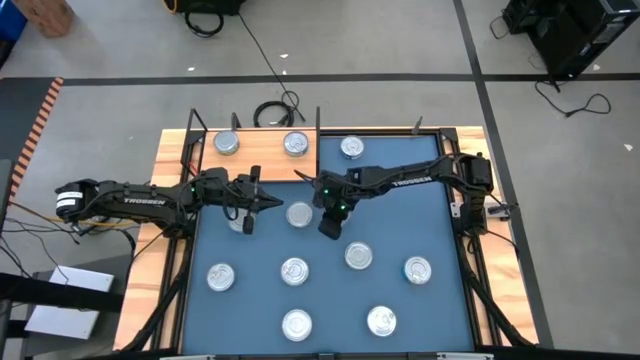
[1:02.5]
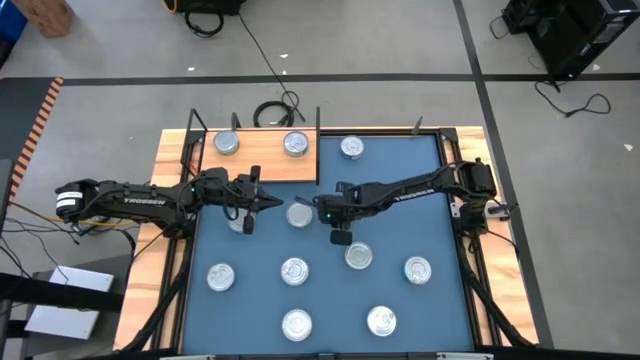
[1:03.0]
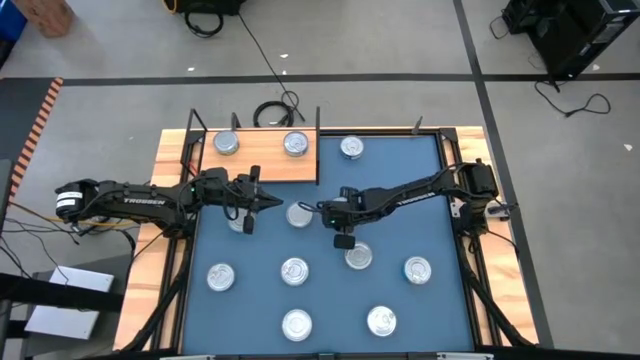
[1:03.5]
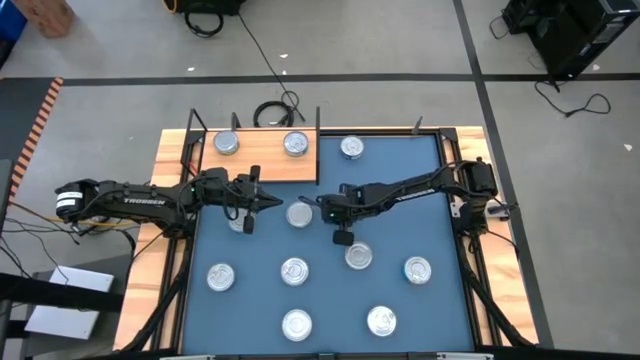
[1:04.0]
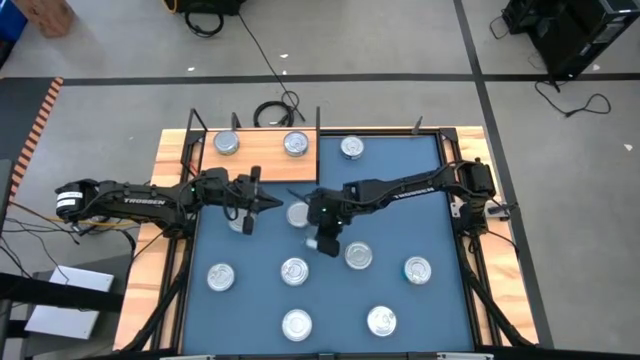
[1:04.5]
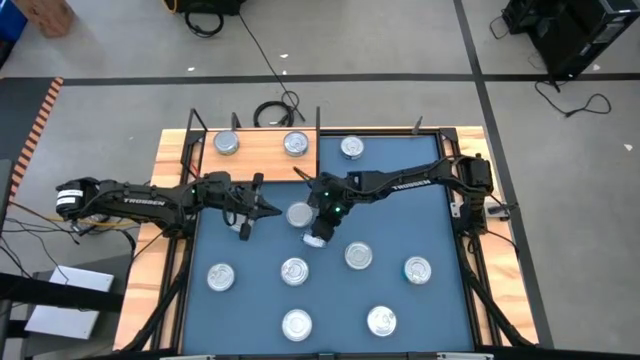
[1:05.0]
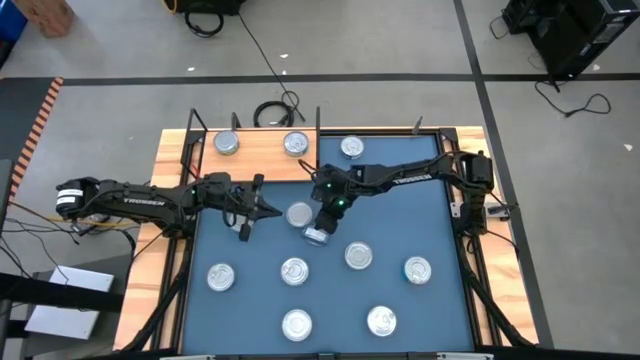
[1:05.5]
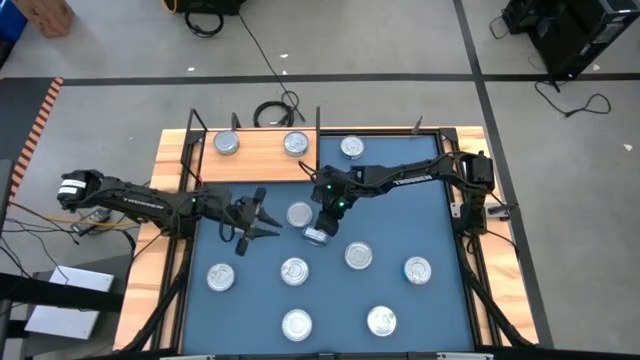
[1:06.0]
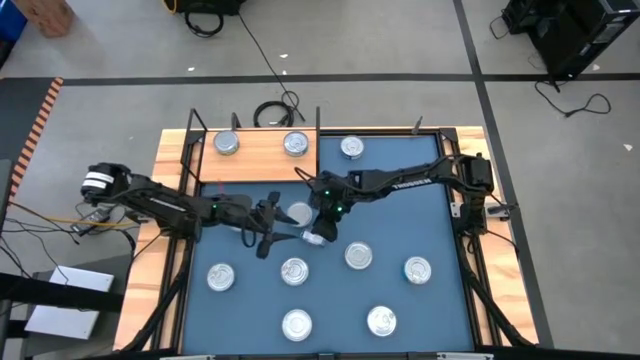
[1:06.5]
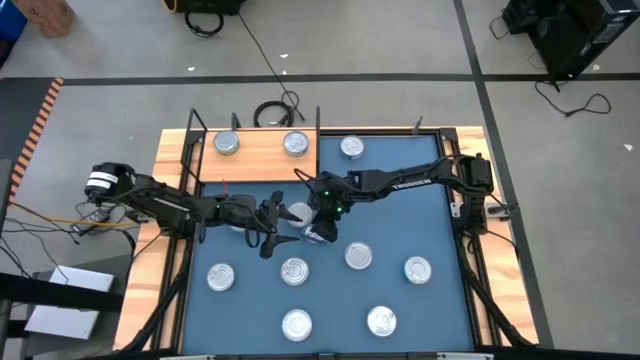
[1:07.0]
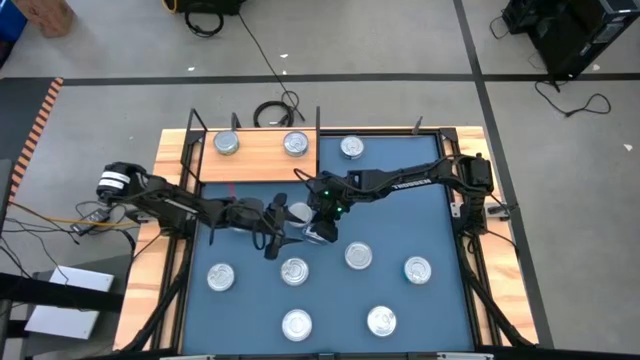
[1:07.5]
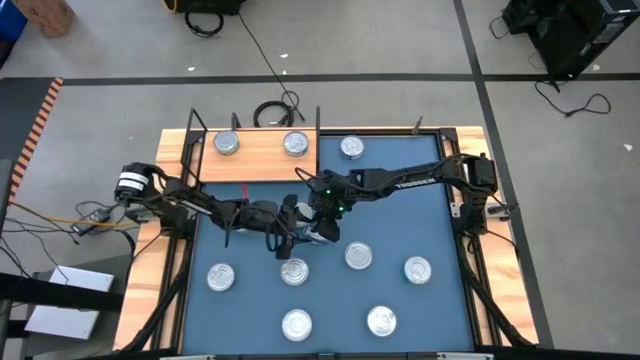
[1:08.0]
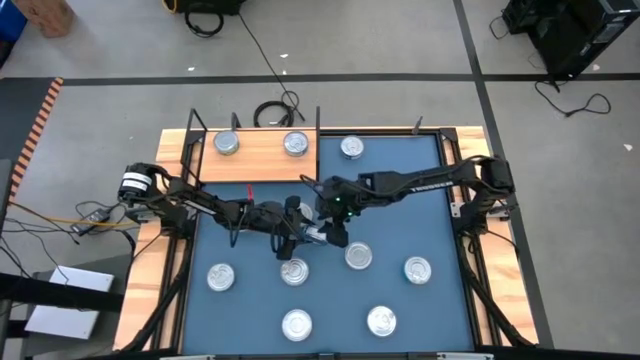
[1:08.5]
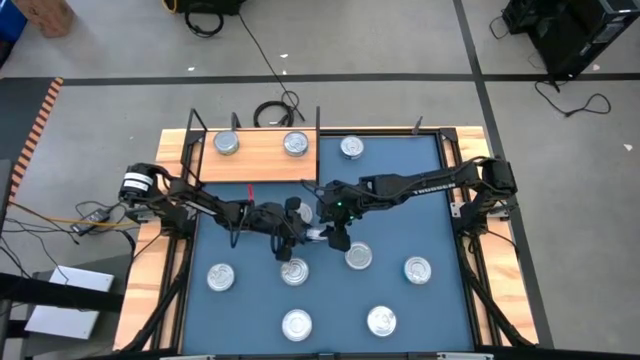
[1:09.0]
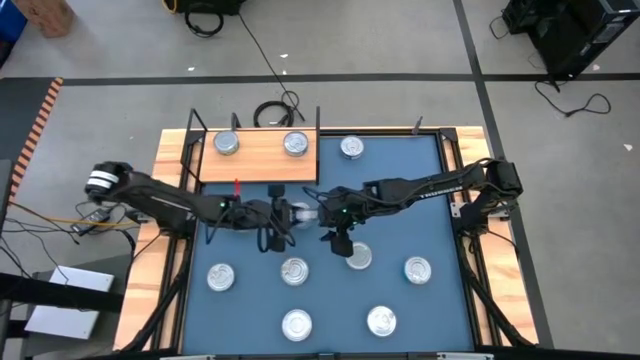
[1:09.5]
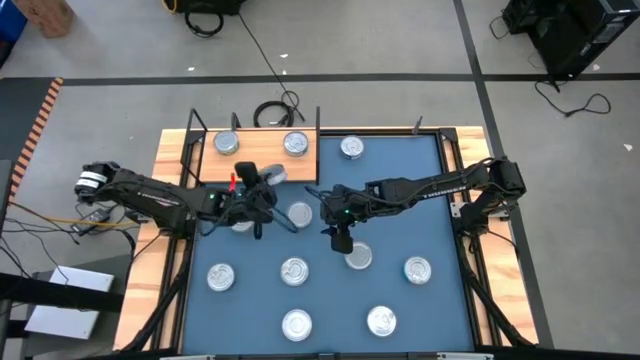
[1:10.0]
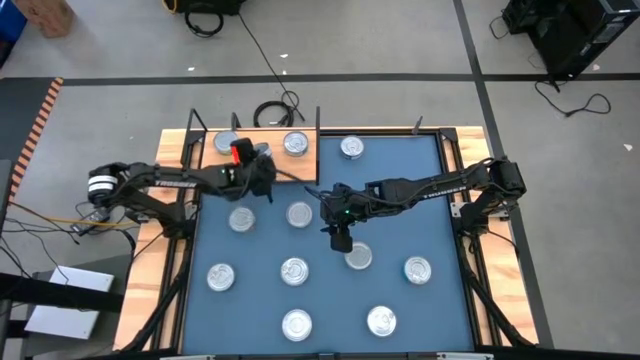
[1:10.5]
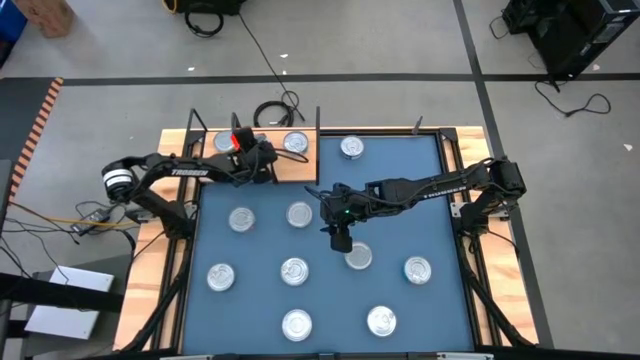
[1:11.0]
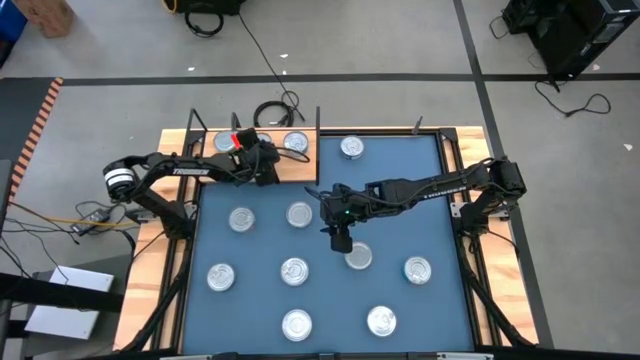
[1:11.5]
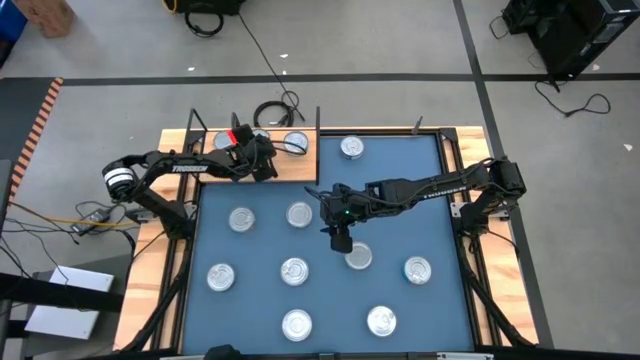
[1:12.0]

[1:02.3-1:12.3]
Task: Stack canned seafood by type on shelf
Put the blue tuna can on the shelf

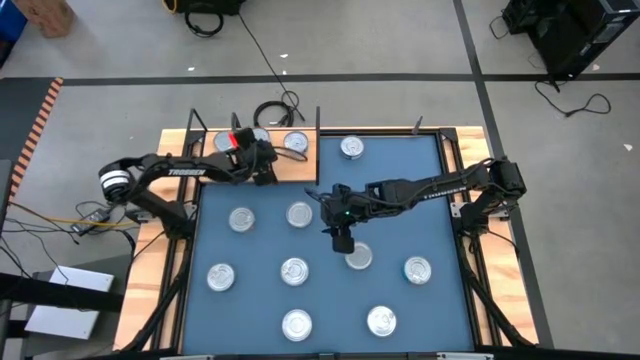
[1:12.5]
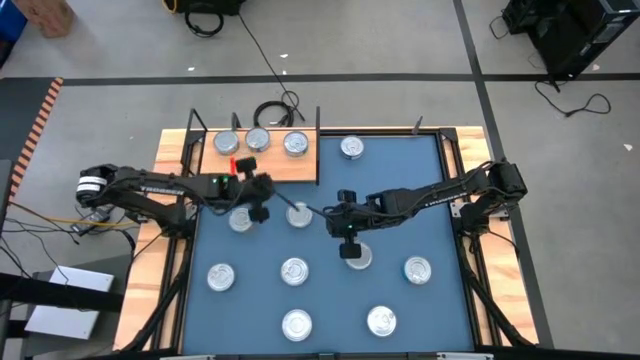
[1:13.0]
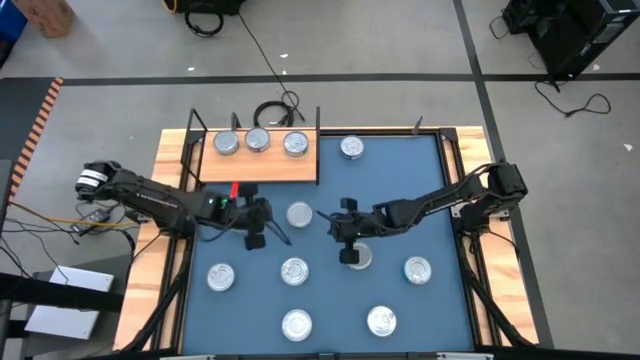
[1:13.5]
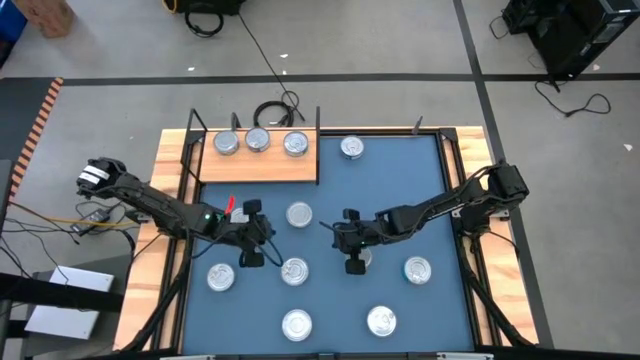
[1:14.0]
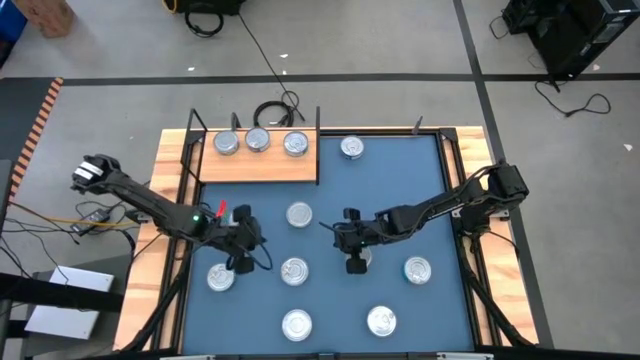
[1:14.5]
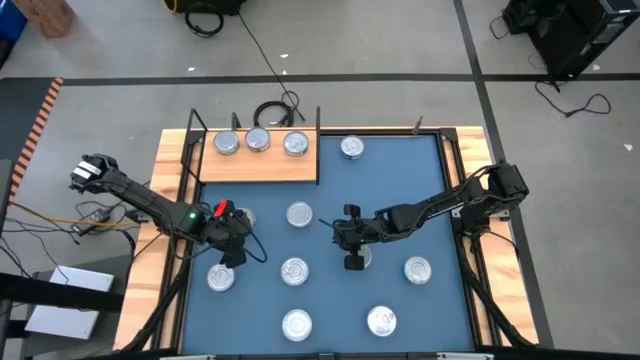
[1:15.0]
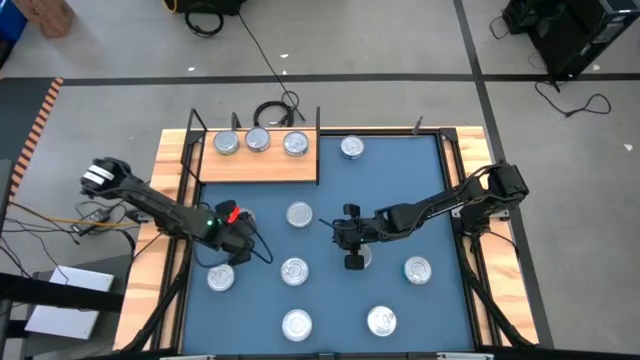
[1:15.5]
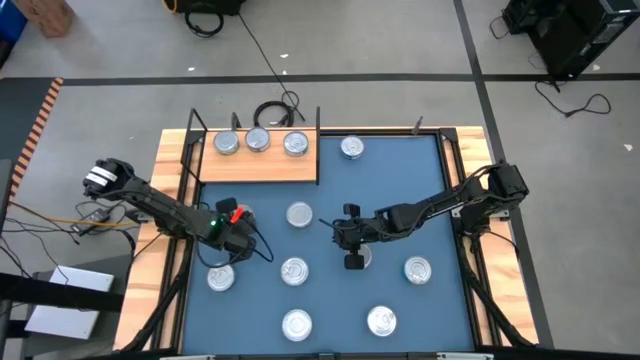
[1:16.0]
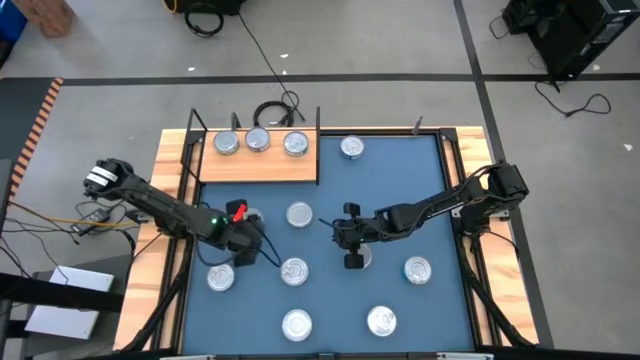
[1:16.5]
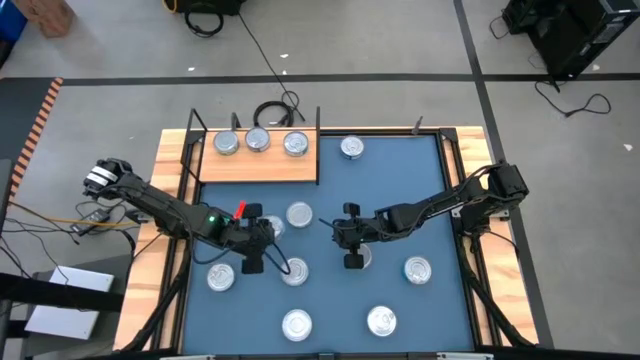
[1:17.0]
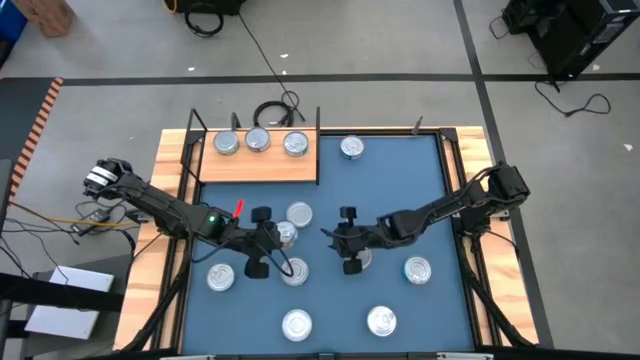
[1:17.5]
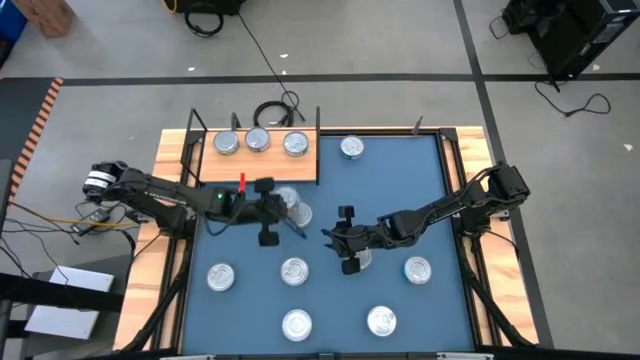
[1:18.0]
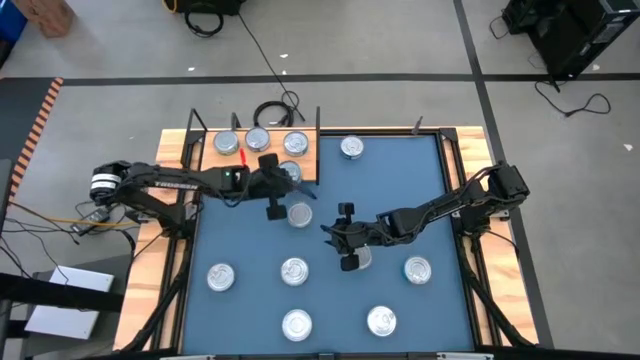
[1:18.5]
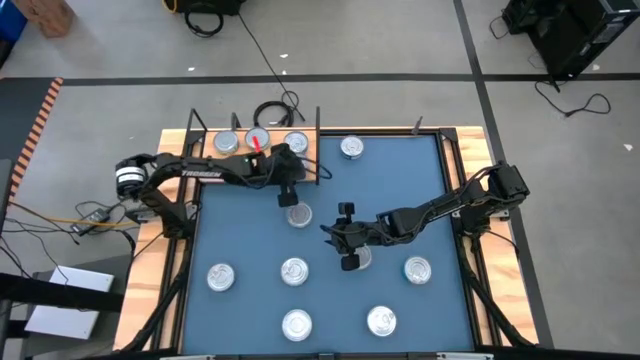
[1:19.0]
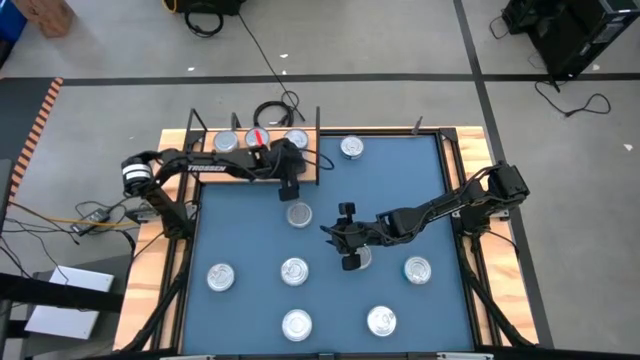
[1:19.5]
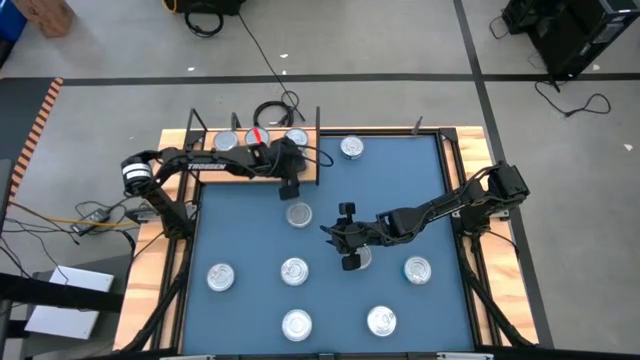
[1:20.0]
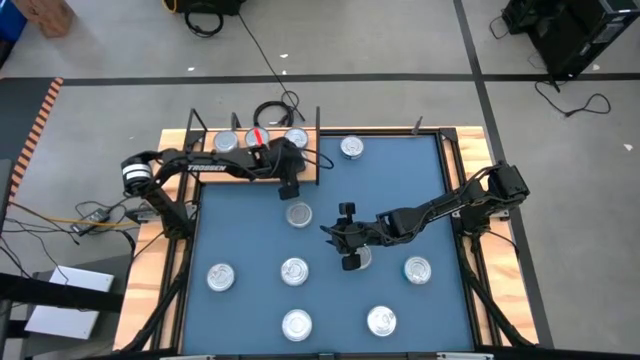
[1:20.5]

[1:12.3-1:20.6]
Put the yellow blue tuna can on the shelf aligned with the other yellow tuna can
